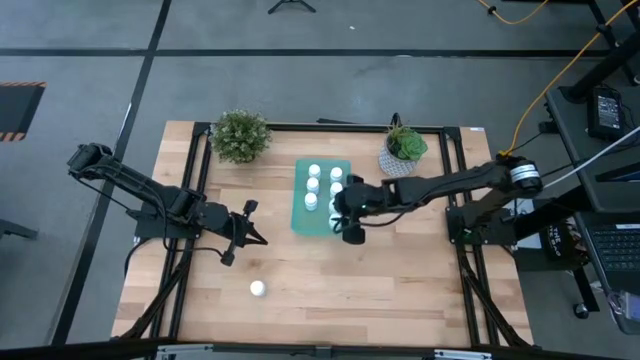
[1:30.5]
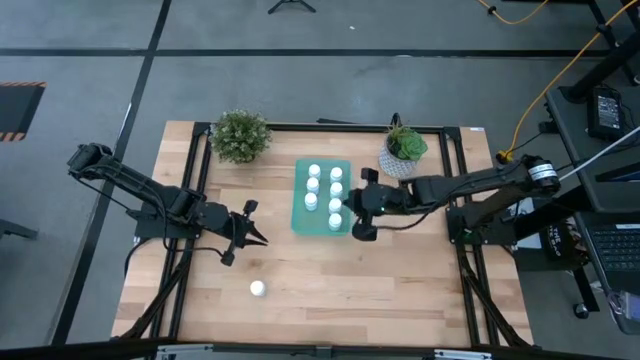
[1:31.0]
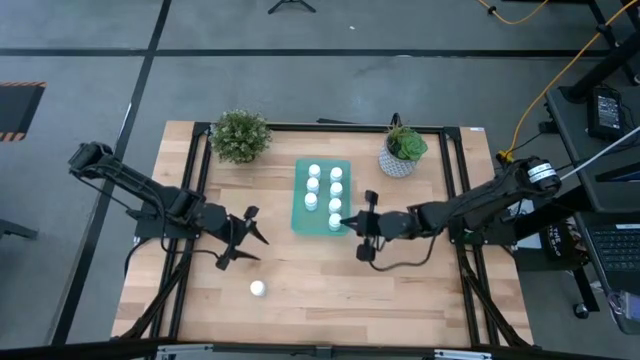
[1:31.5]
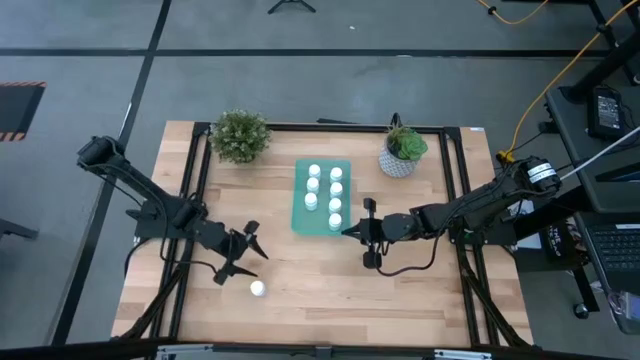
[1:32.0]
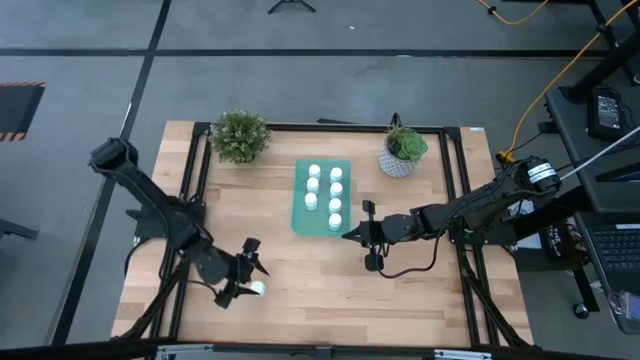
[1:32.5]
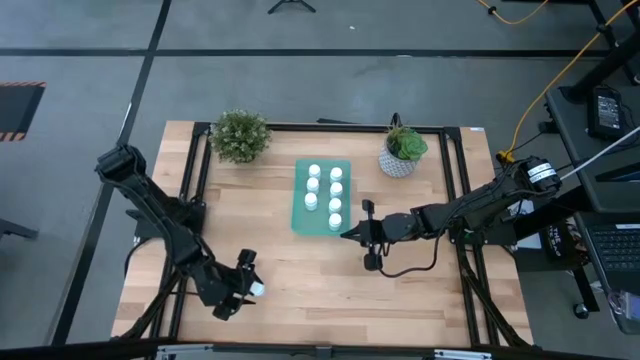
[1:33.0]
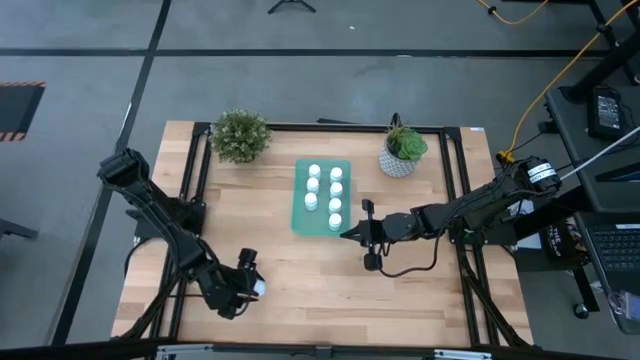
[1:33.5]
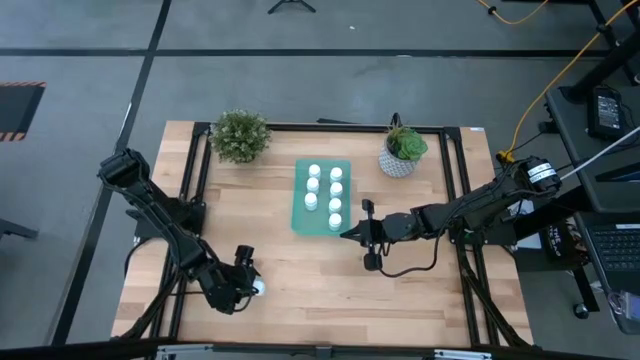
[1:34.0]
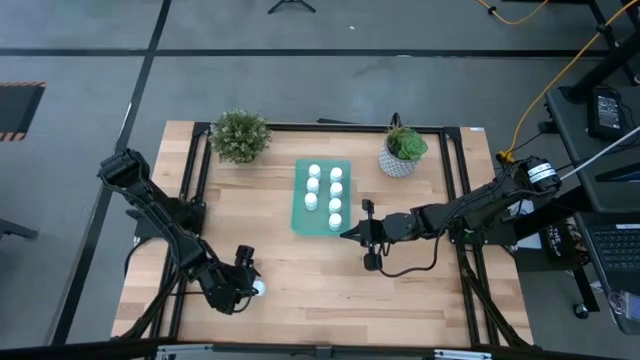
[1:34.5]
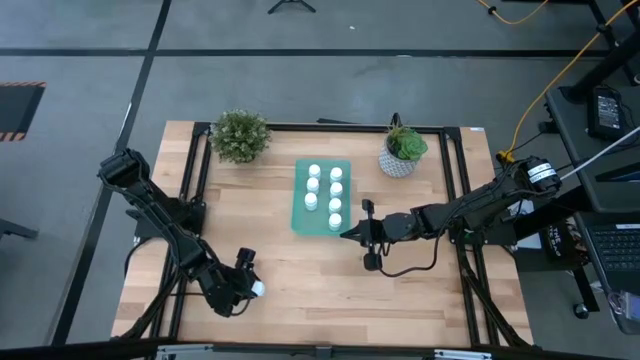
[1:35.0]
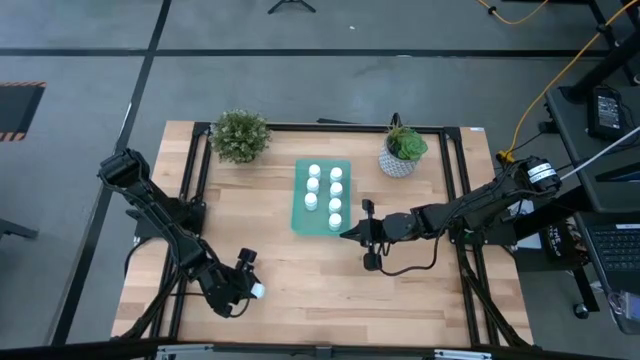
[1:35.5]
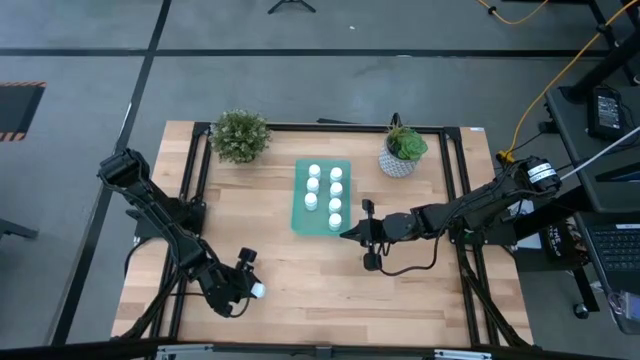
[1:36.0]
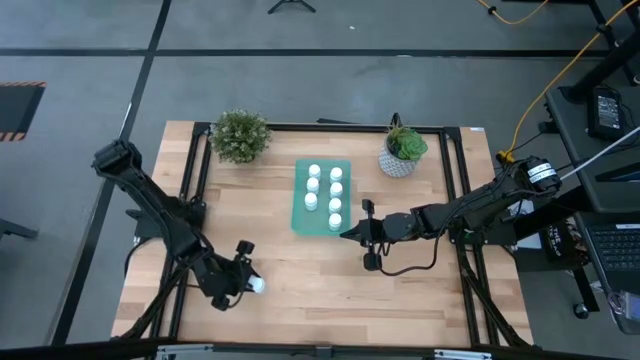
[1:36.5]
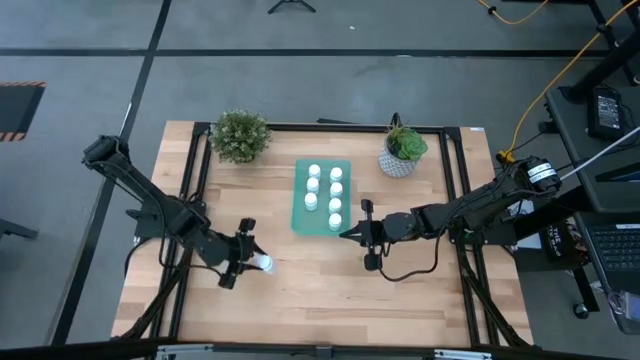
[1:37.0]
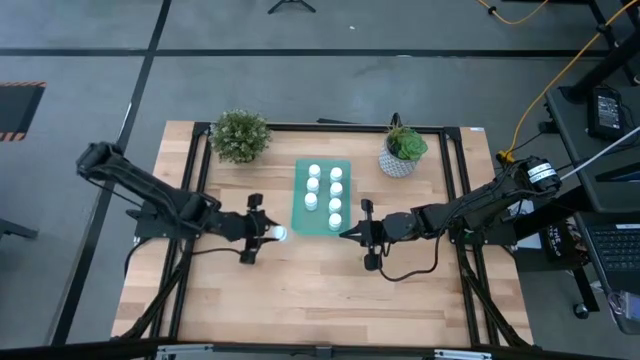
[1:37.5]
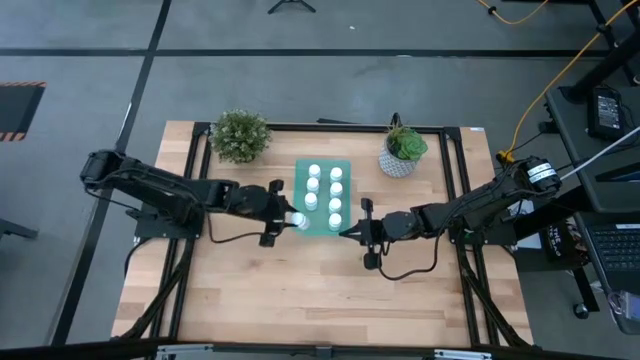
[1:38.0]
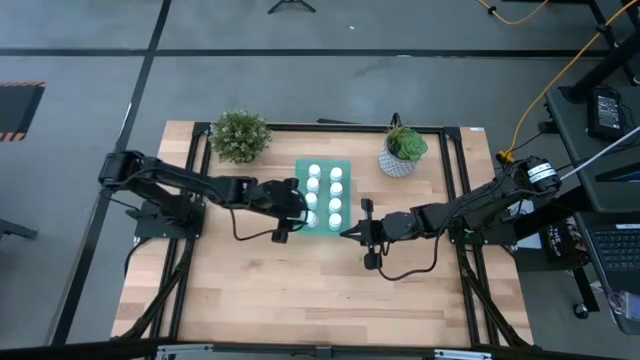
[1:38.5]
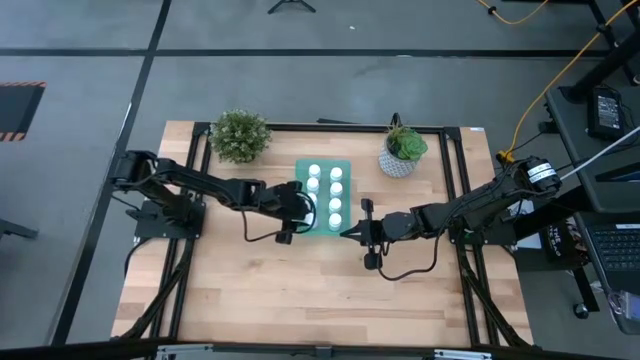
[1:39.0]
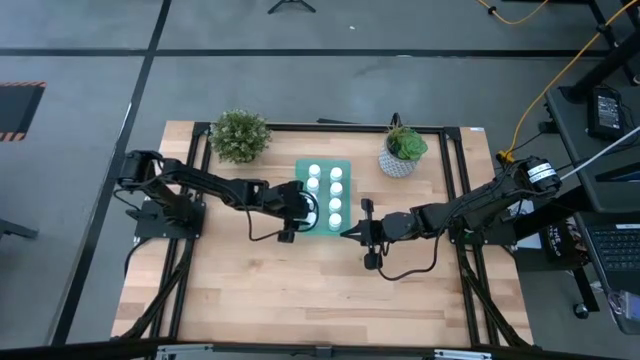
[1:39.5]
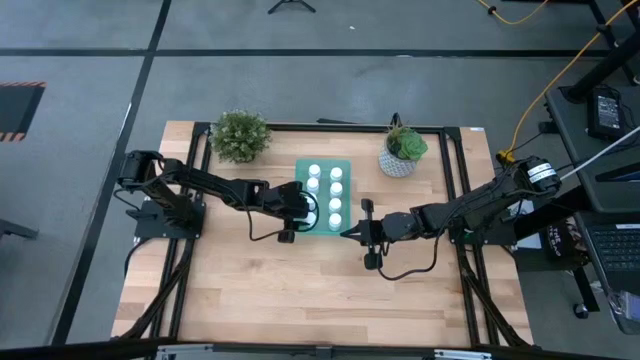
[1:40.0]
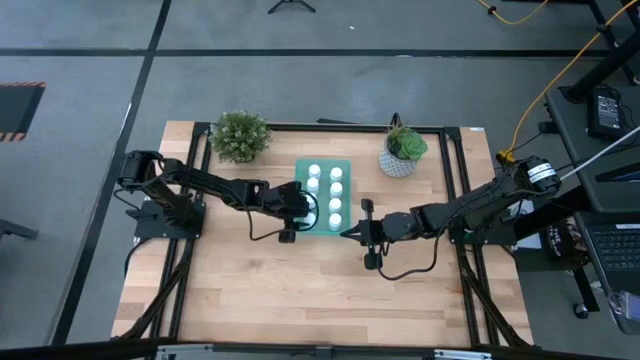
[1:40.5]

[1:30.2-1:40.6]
Task: Pick and place pill bottles into a basket
Put the white pill bottle into the green bin

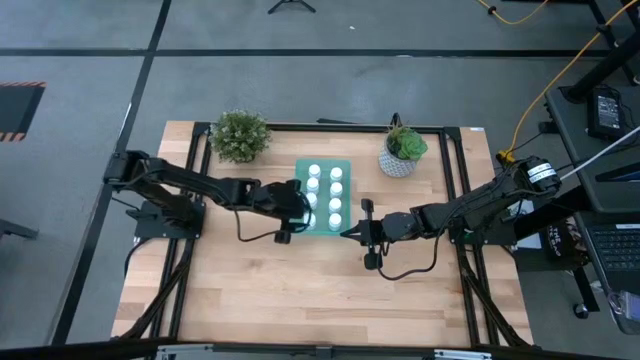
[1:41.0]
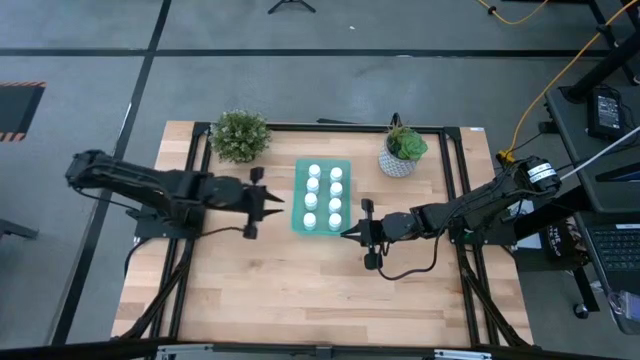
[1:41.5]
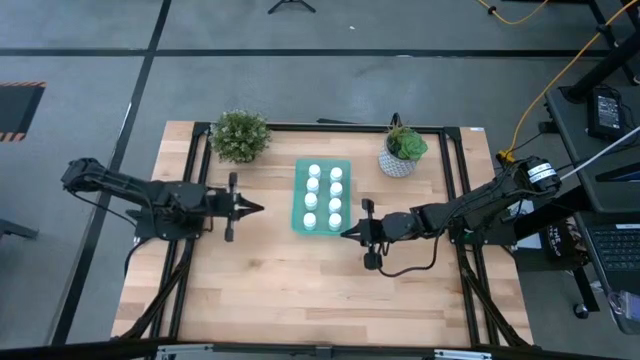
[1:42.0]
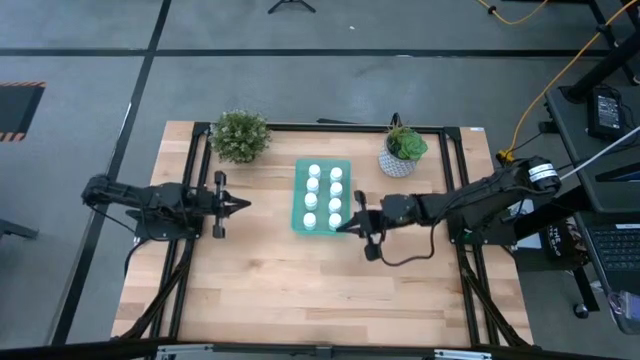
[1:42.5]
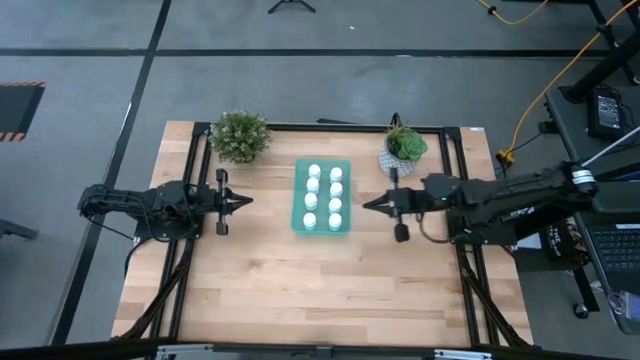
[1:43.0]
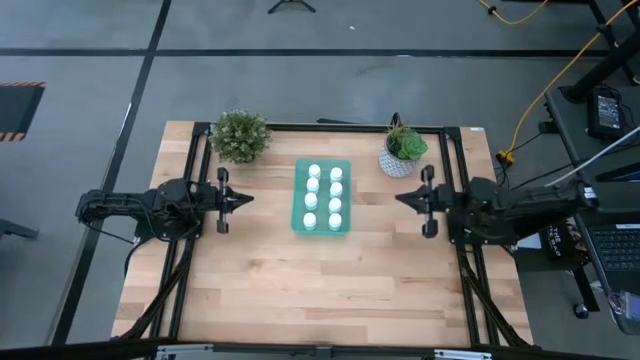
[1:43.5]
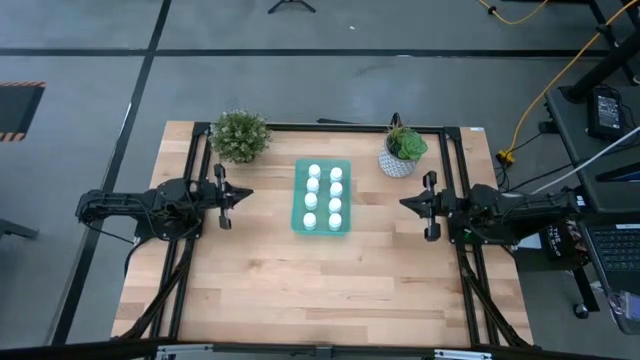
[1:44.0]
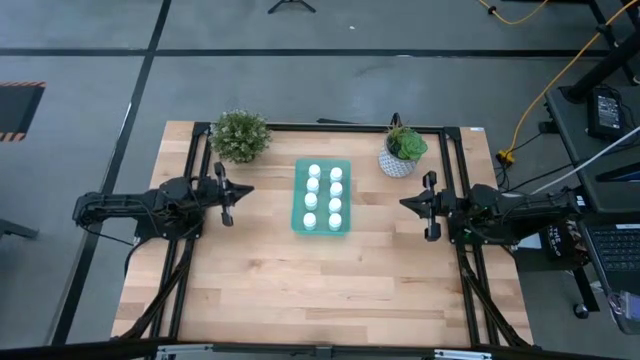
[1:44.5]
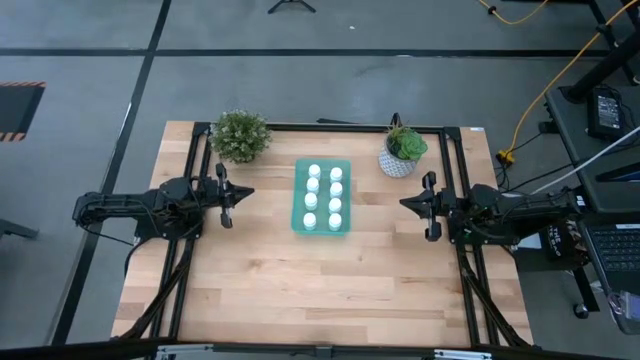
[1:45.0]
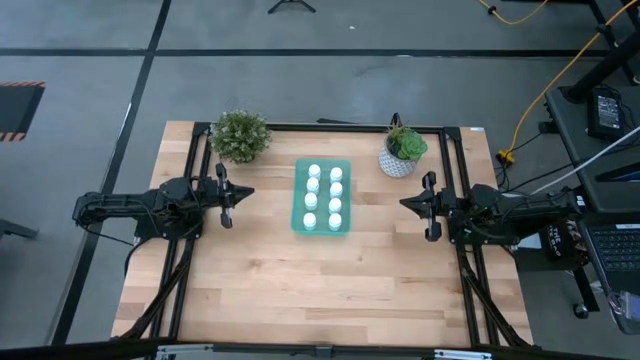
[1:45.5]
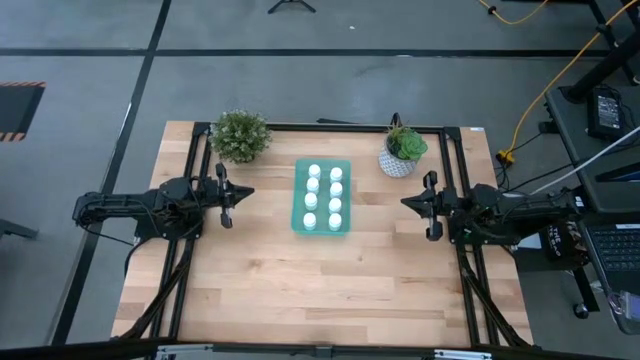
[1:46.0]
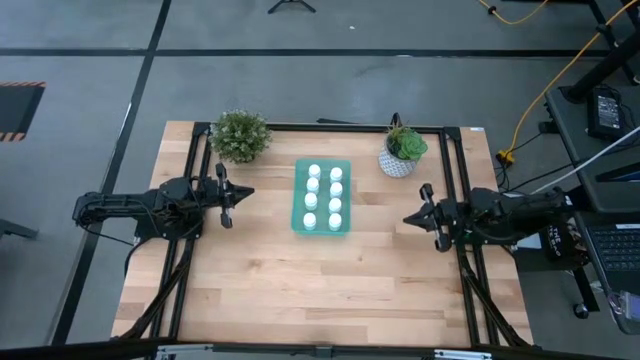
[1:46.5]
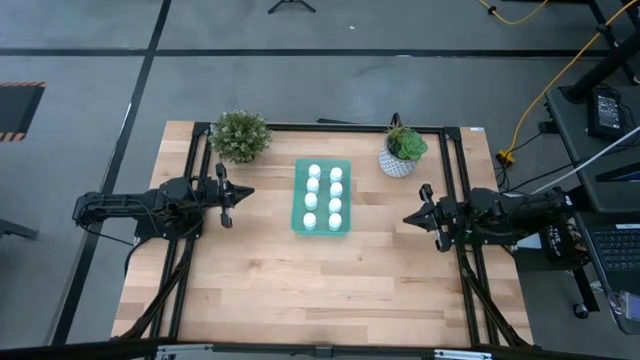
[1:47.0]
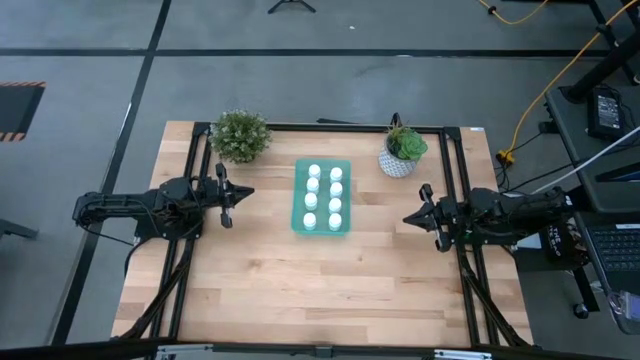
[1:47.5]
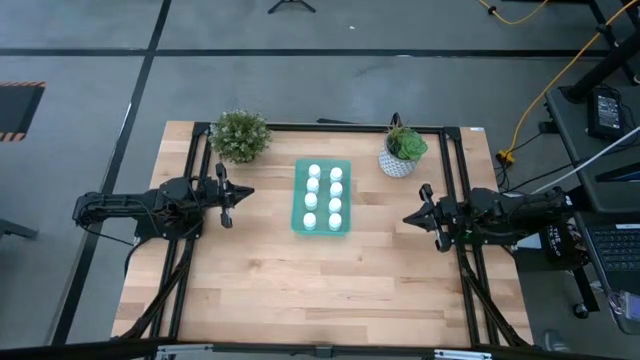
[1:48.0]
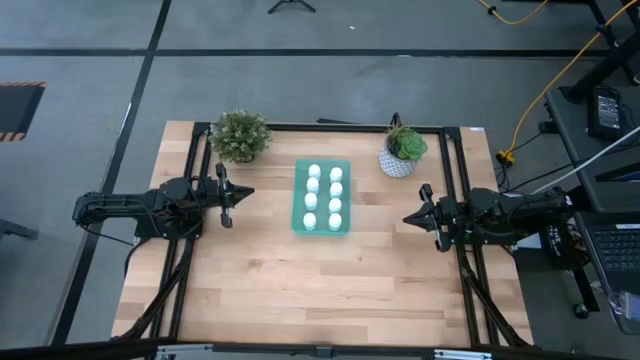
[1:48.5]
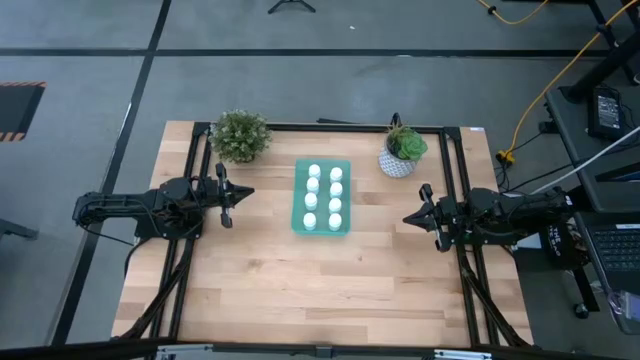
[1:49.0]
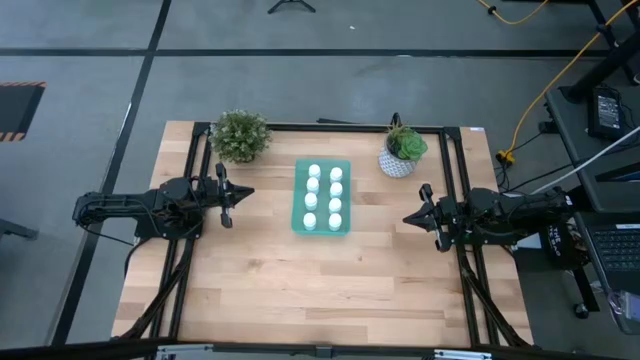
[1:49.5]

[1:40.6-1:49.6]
Return to Home Position

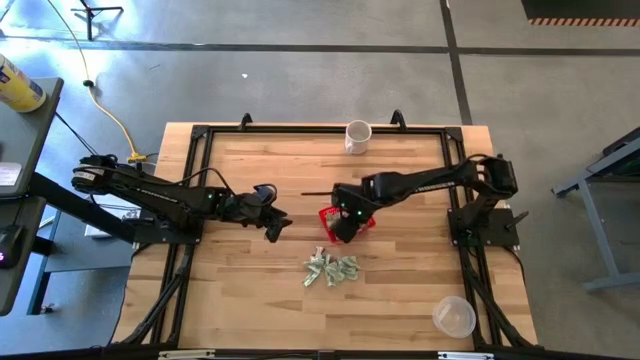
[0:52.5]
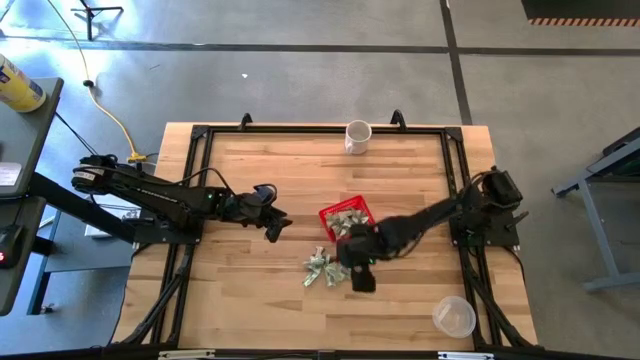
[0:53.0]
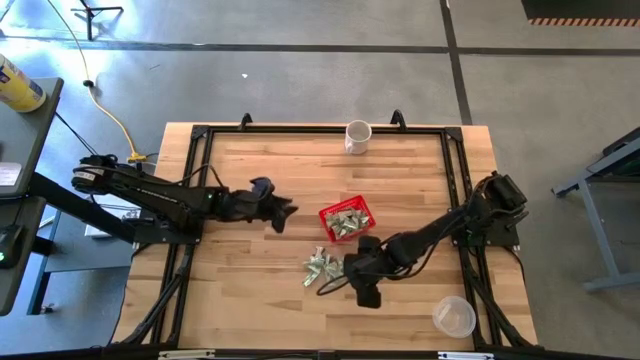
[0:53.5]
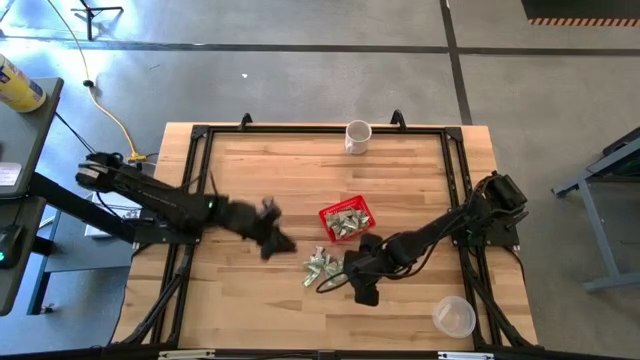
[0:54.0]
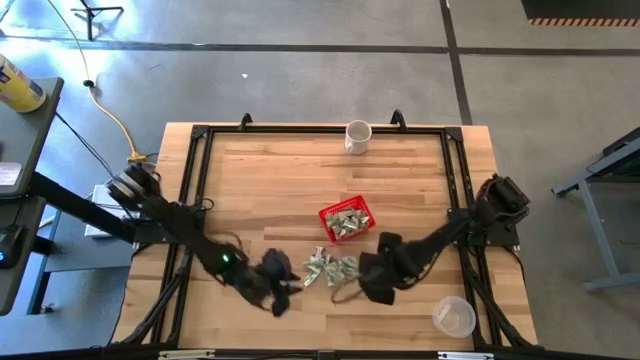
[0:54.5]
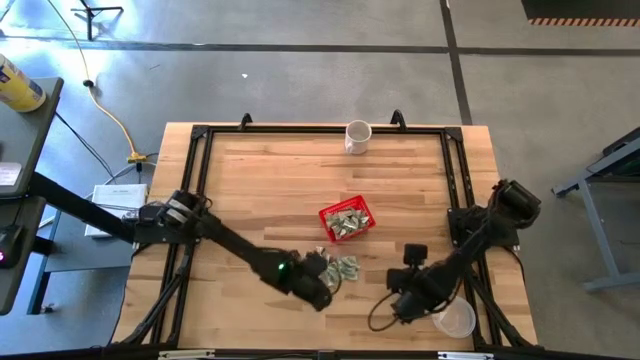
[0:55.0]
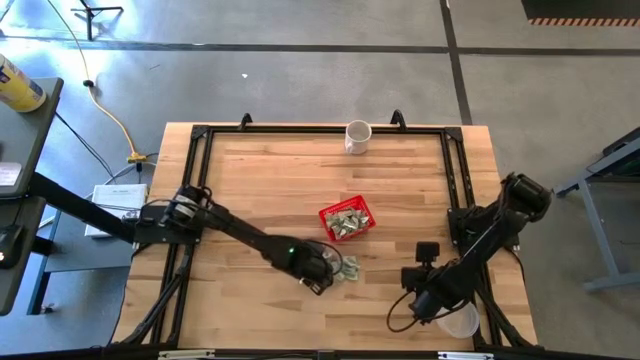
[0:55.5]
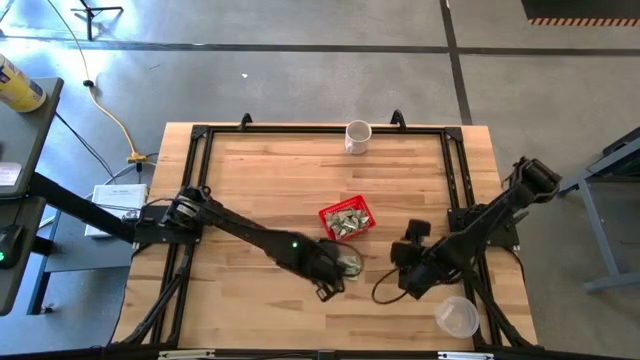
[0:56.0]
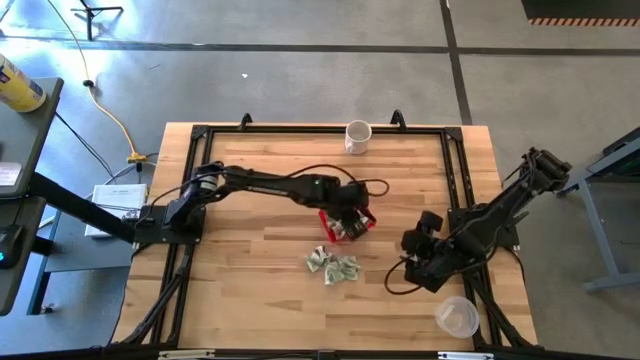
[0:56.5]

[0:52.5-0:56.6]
Task: Pick and place items into bin
Put the white stevia packet into the red bin
